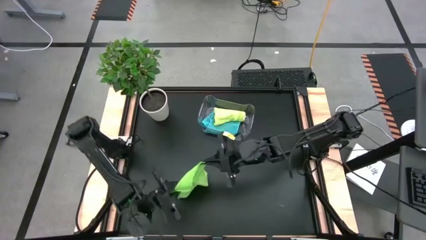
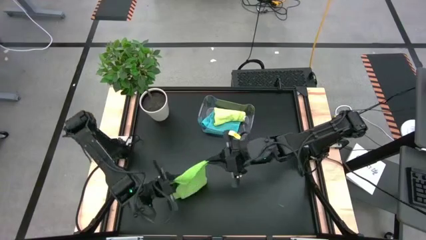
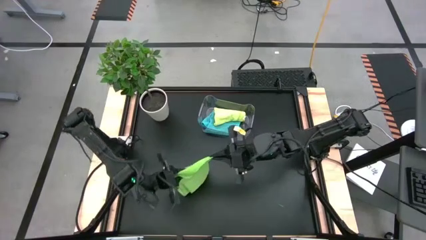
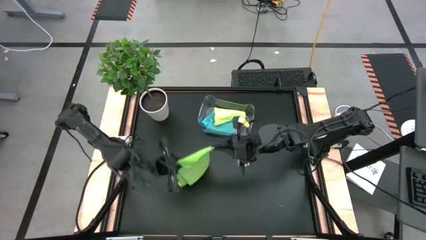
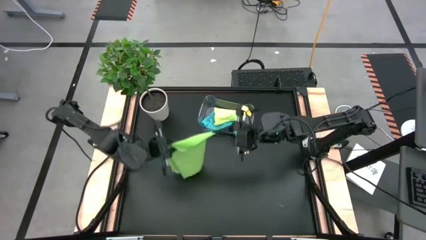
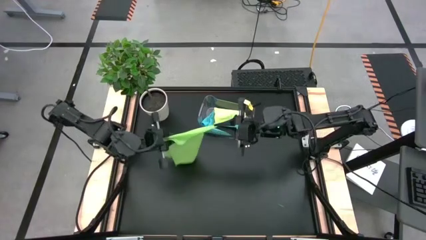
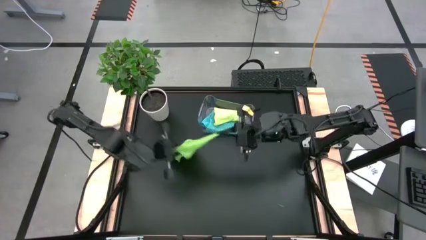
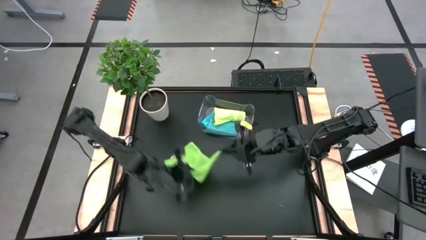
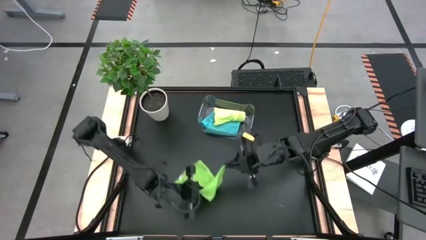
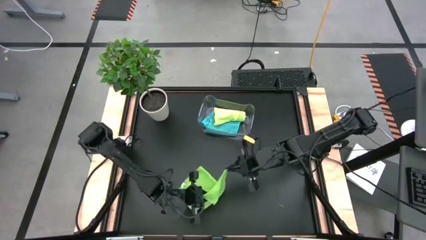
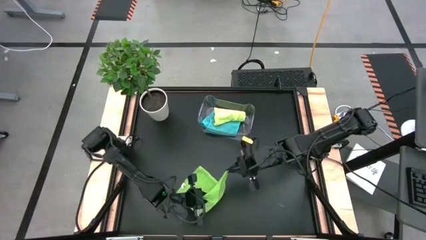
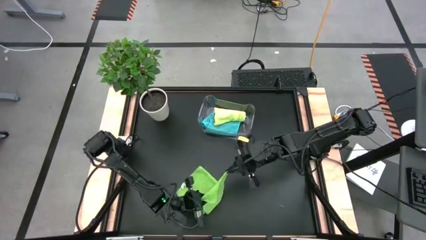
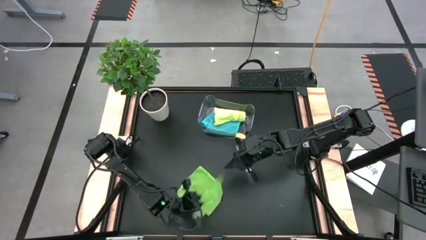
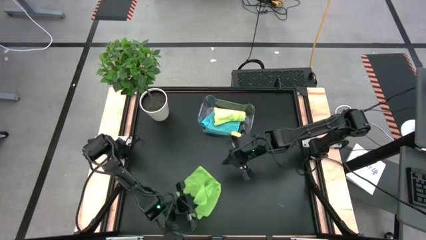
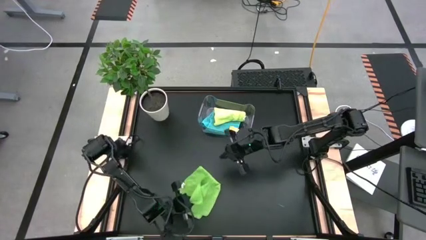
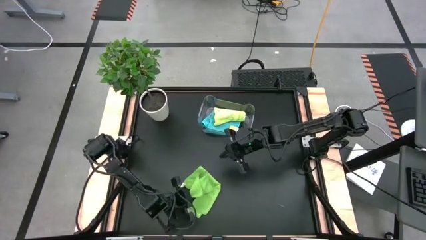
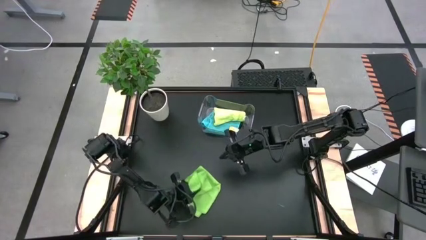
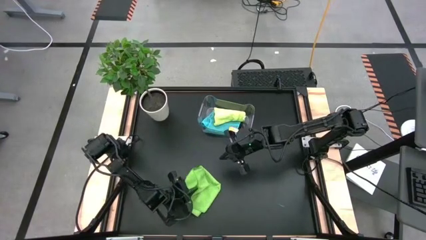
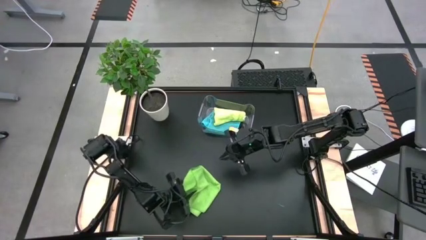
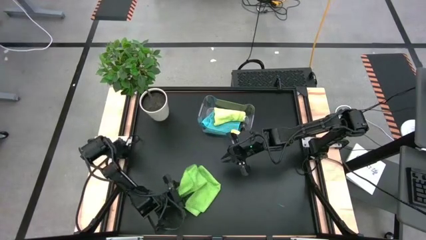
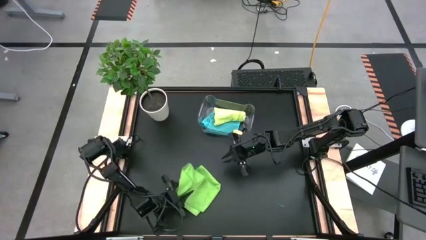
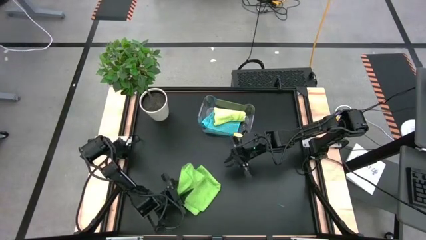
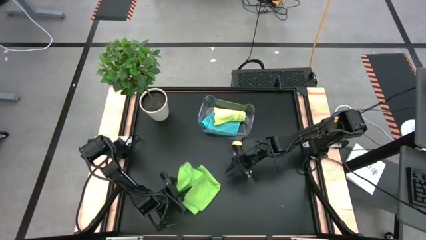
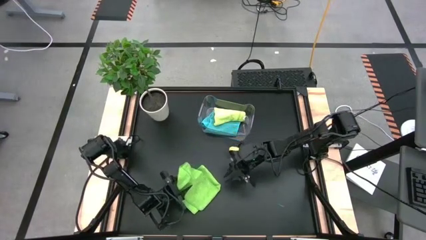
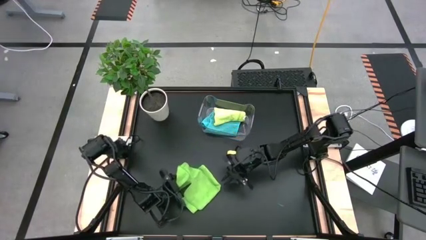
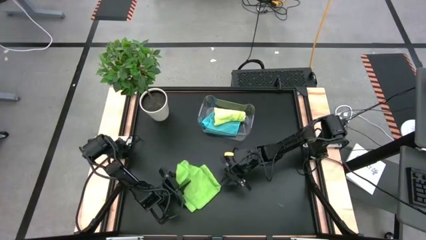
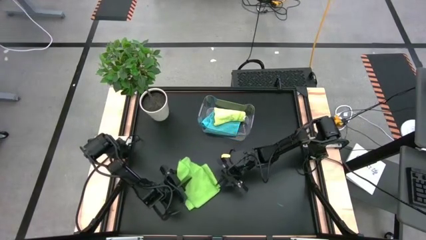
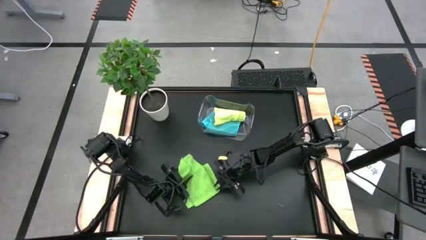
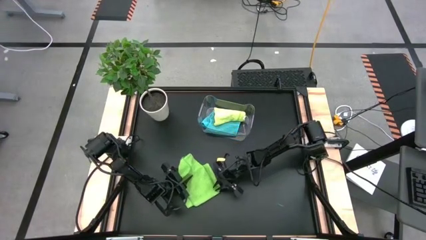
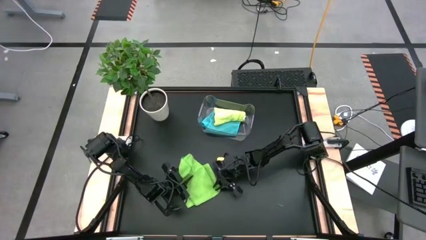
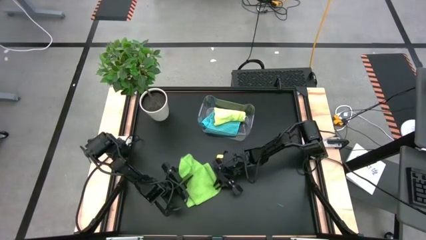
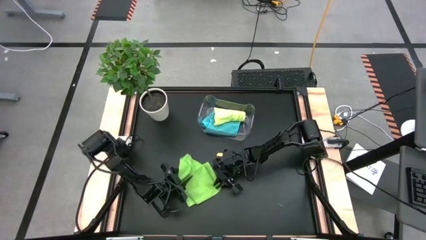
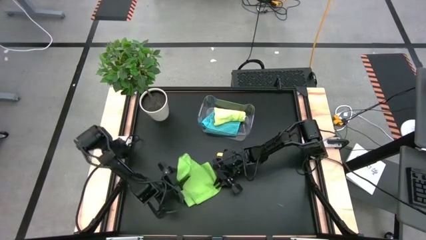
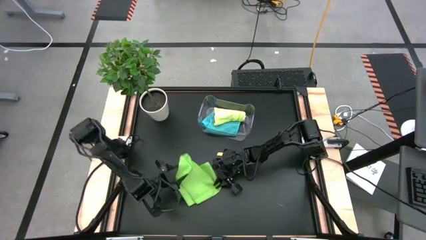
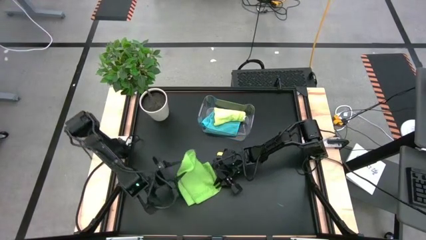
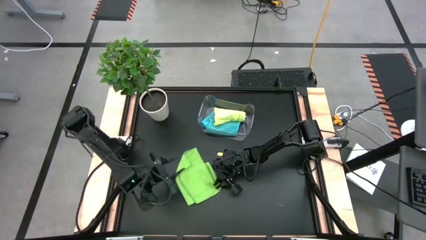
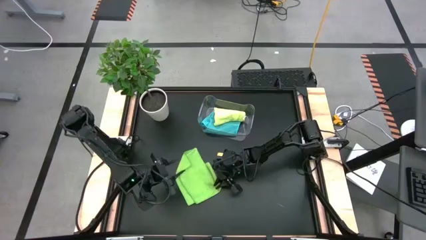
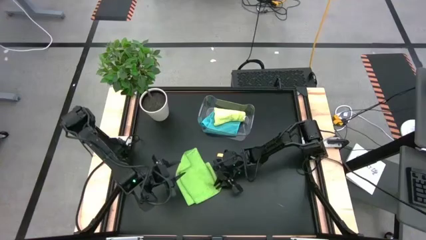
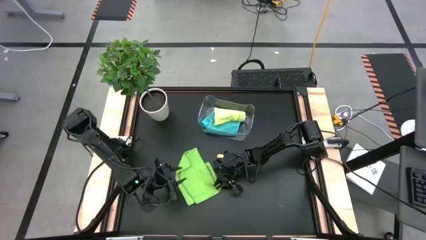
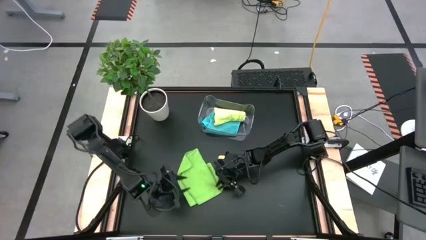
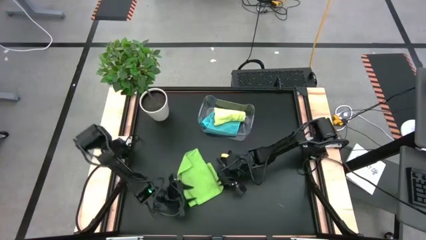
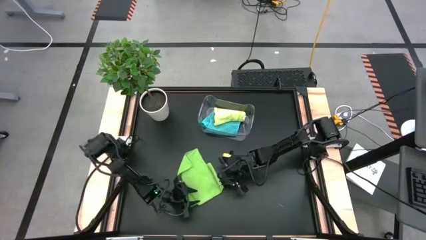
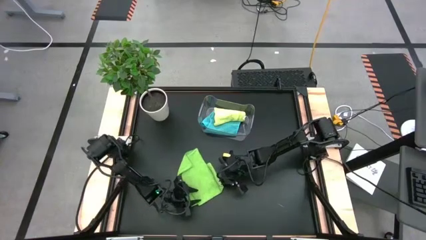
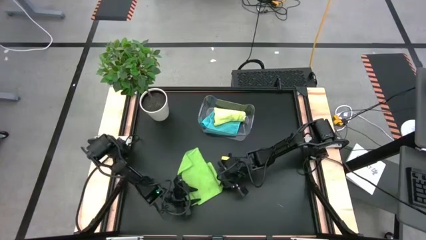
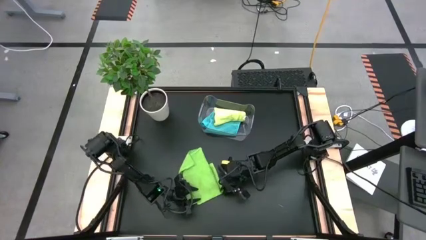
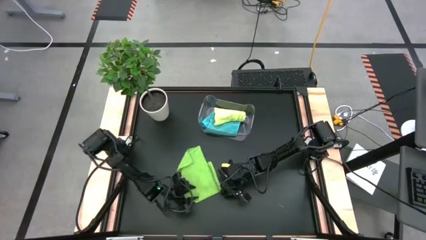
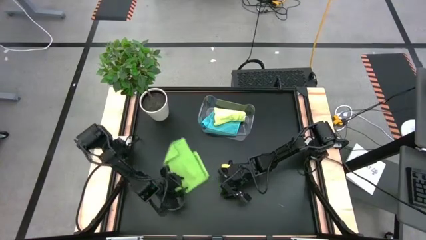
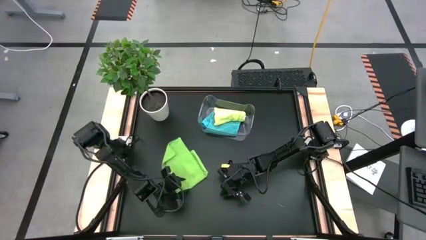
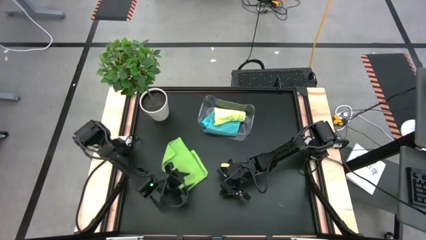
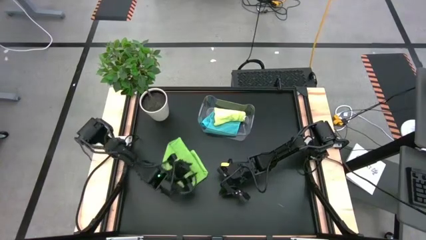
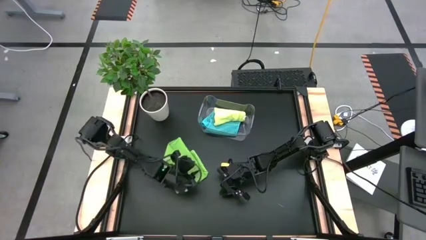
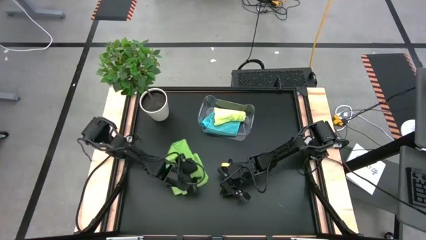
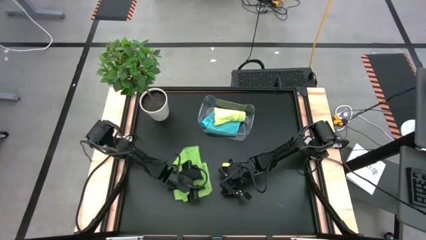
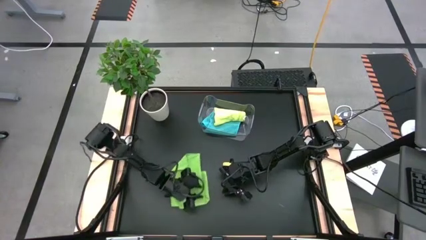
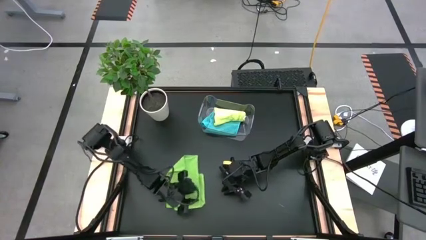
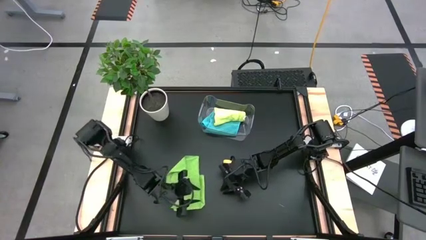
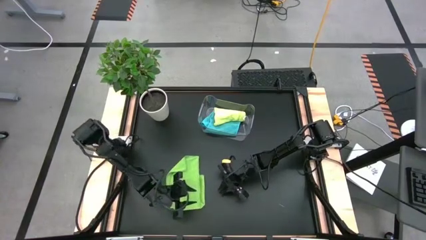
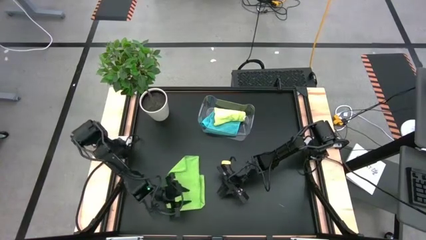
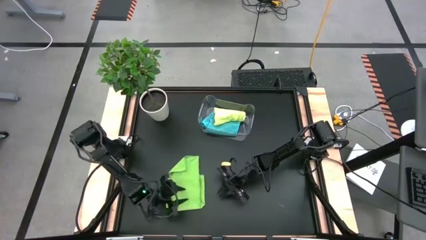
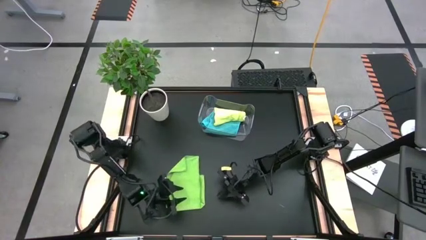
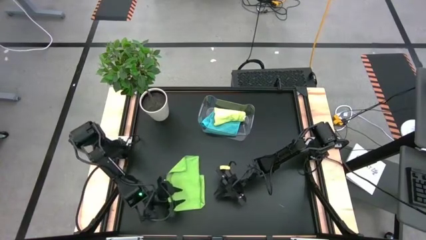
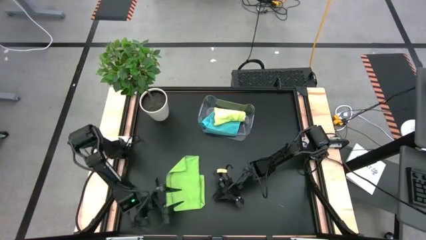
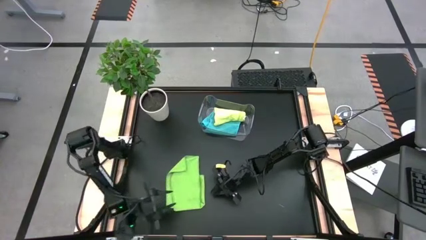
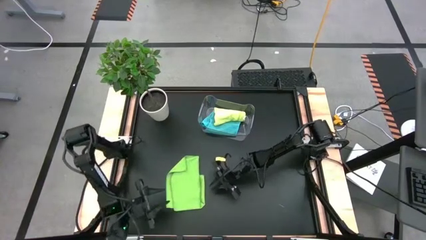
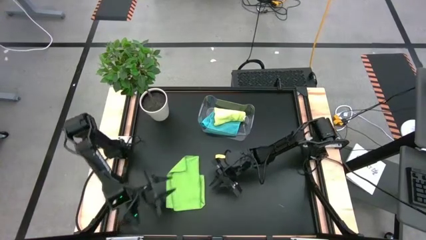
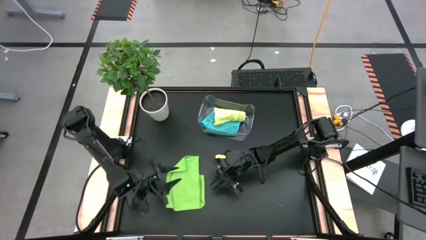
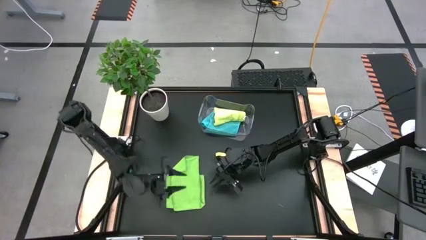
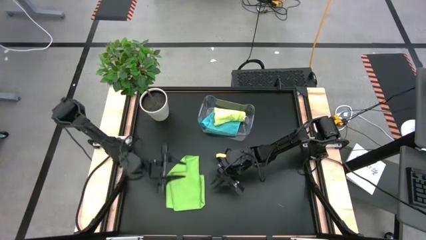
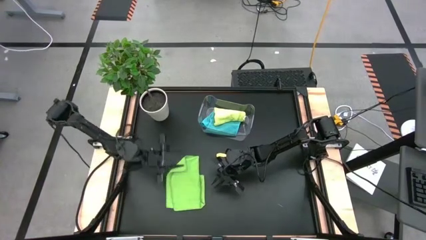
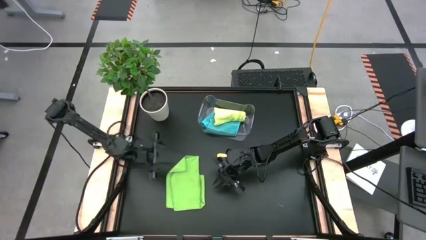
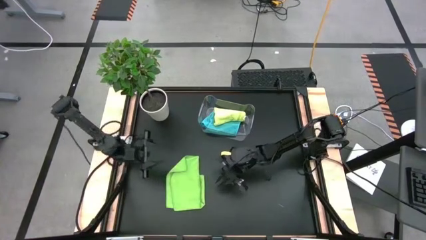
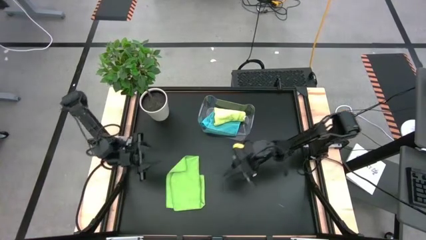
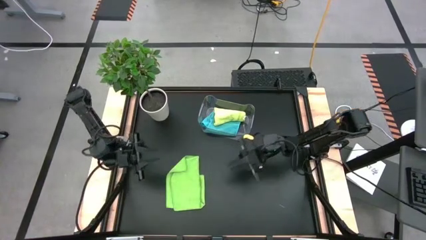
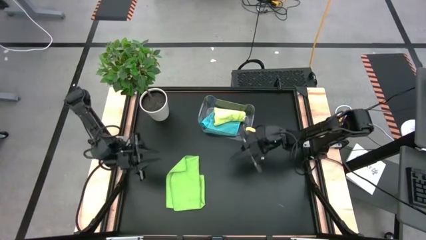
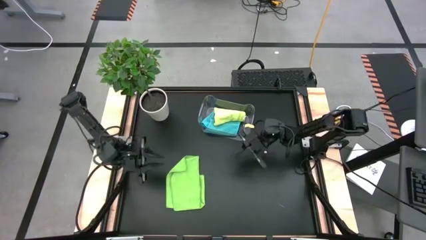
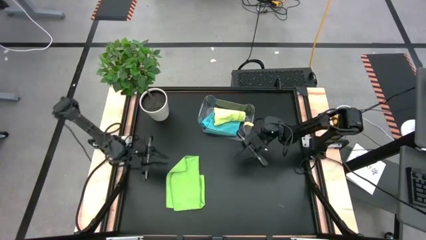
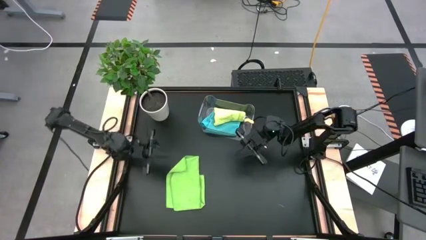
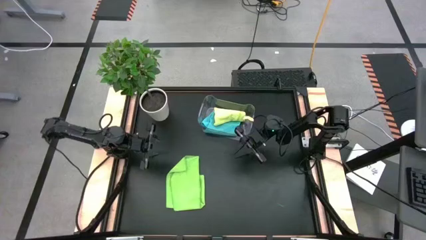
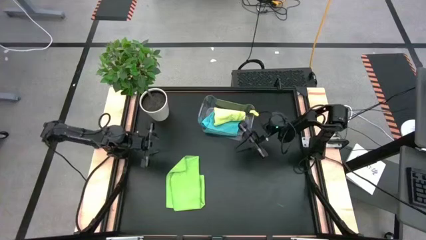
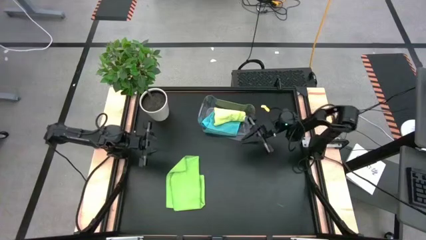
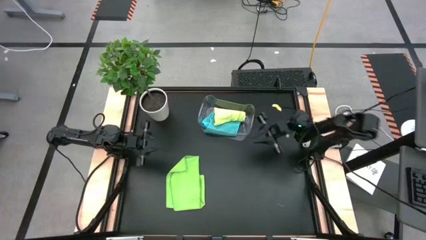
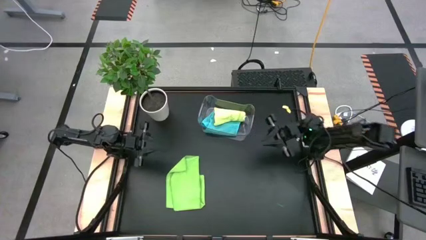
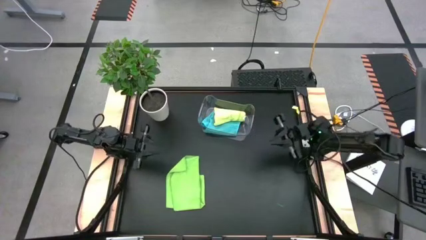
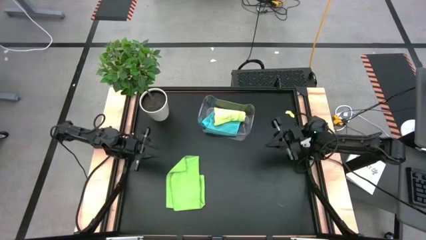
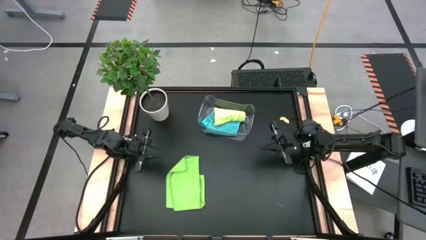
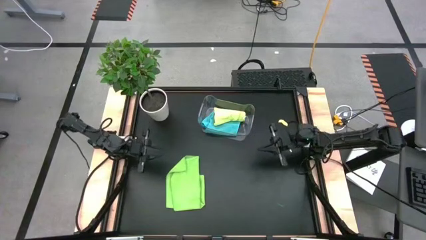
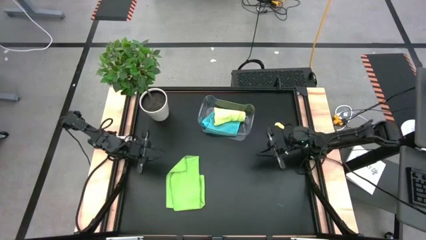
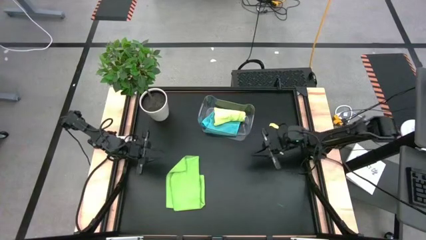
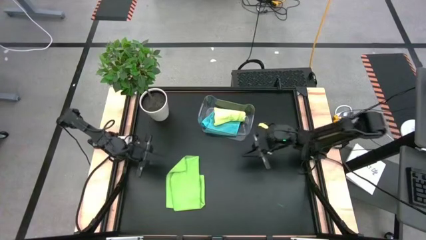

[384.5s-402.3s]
Task: Fold microfiber towels
Fold the green towel
